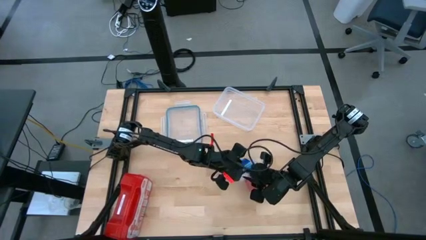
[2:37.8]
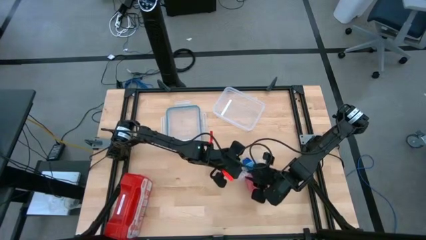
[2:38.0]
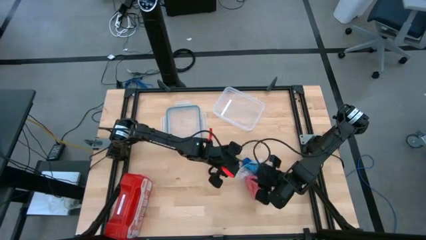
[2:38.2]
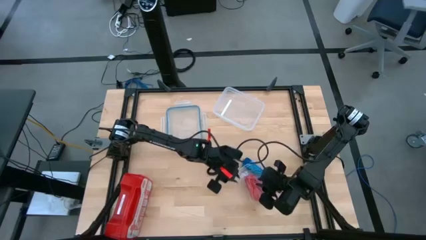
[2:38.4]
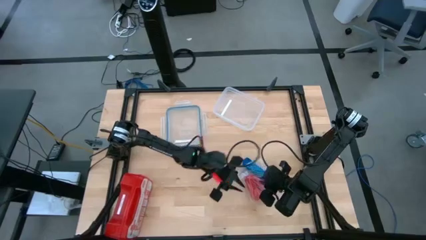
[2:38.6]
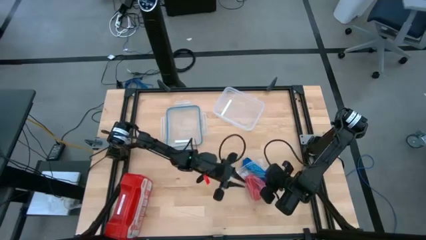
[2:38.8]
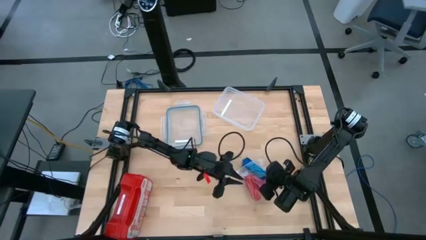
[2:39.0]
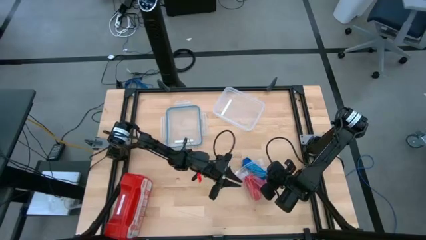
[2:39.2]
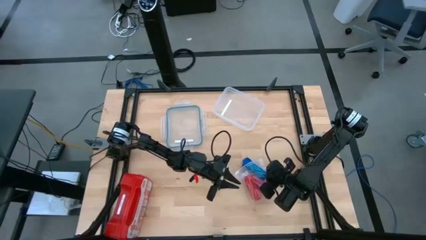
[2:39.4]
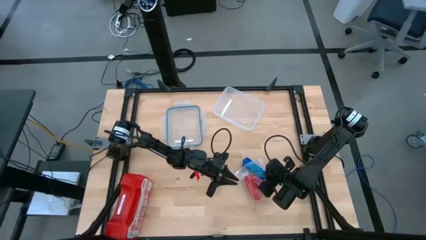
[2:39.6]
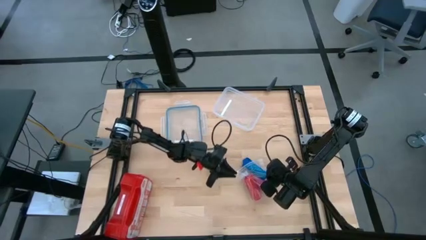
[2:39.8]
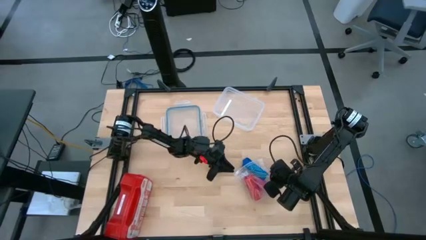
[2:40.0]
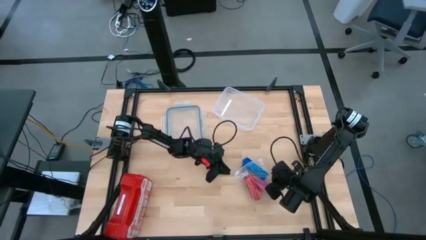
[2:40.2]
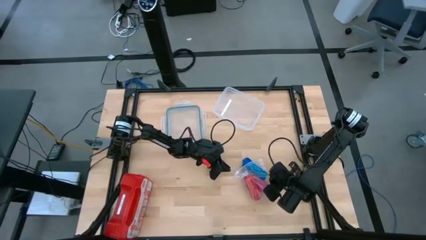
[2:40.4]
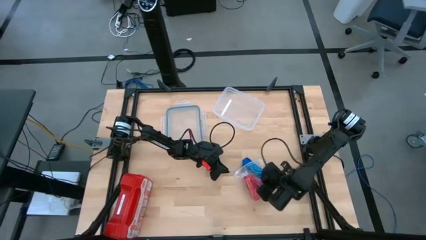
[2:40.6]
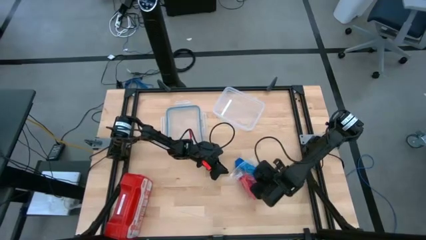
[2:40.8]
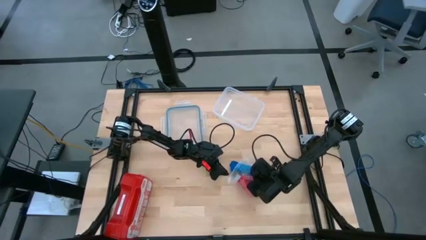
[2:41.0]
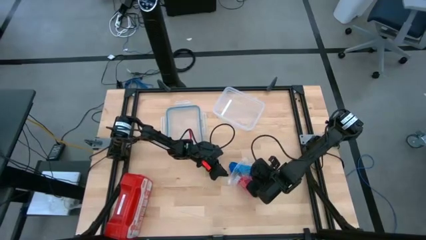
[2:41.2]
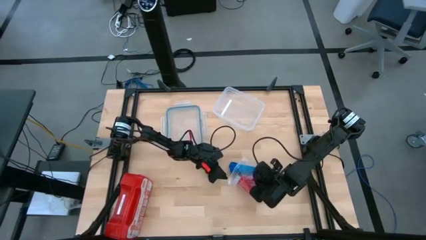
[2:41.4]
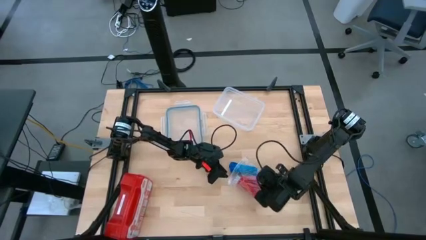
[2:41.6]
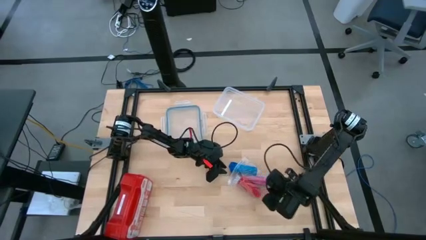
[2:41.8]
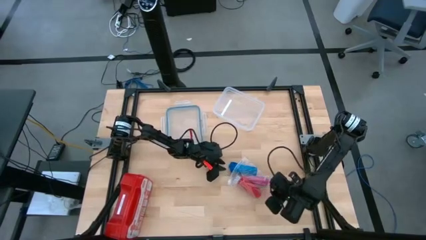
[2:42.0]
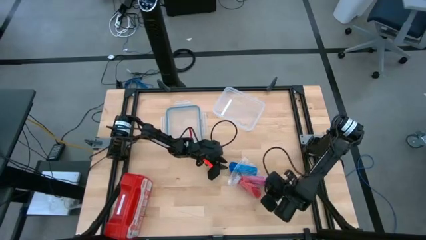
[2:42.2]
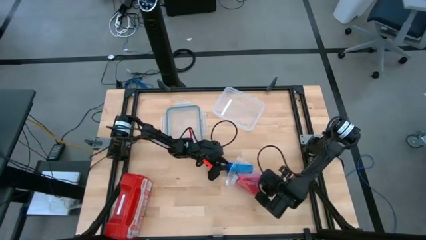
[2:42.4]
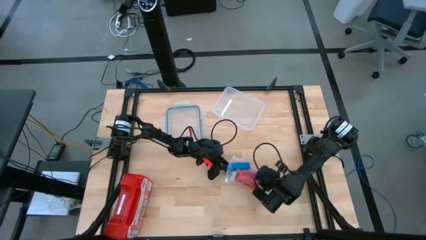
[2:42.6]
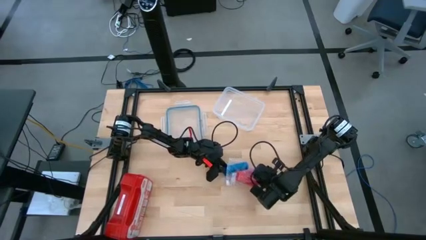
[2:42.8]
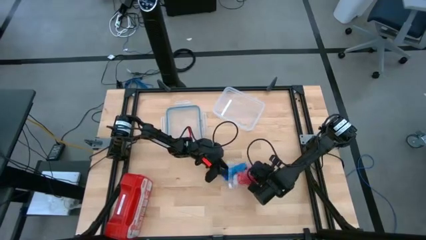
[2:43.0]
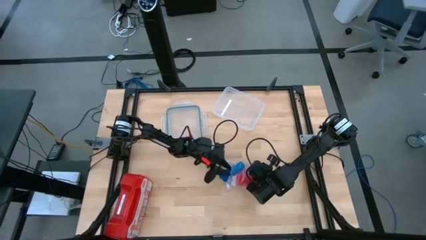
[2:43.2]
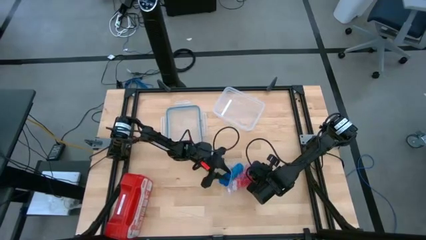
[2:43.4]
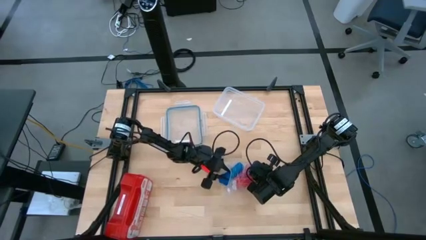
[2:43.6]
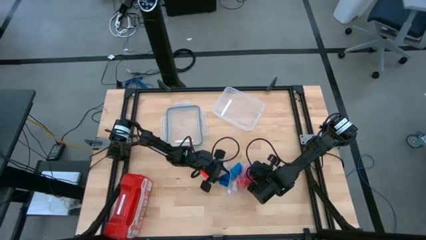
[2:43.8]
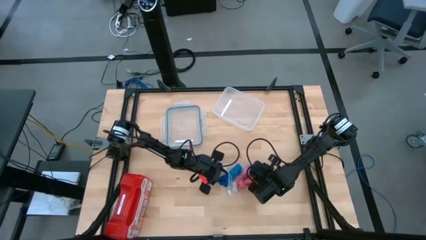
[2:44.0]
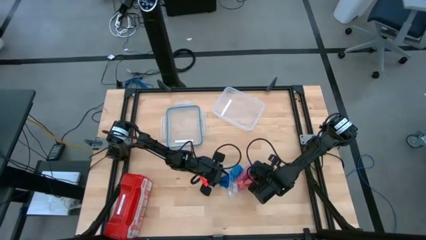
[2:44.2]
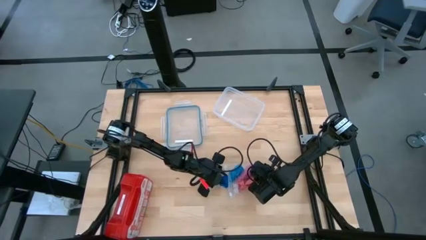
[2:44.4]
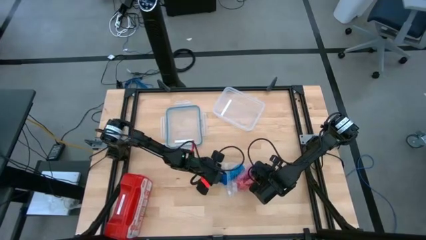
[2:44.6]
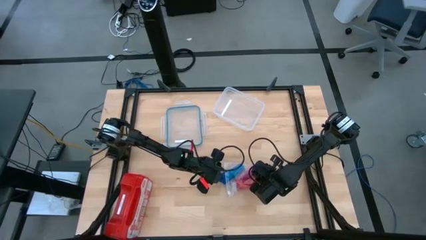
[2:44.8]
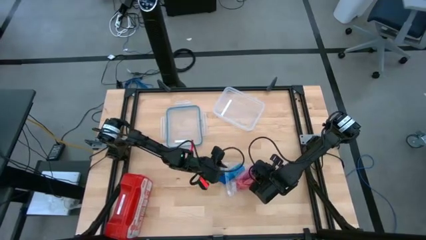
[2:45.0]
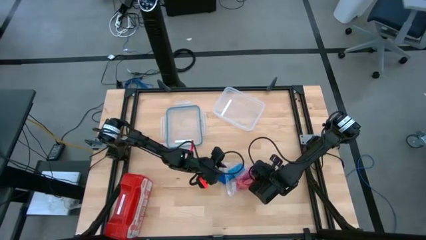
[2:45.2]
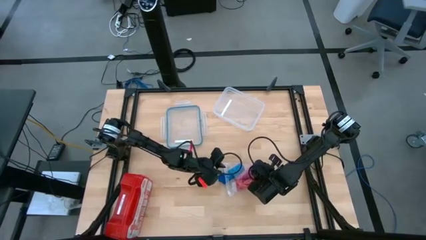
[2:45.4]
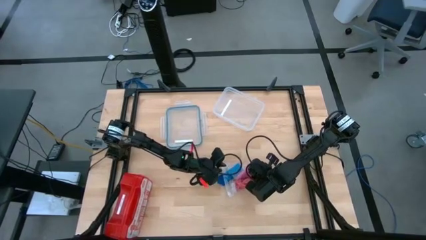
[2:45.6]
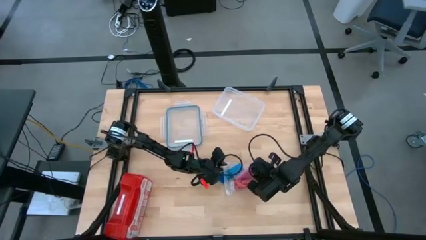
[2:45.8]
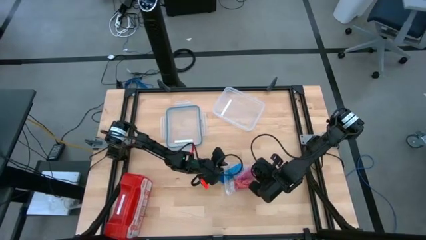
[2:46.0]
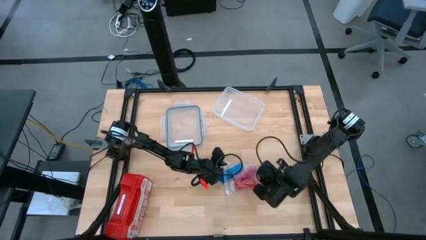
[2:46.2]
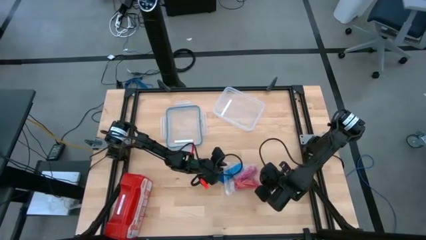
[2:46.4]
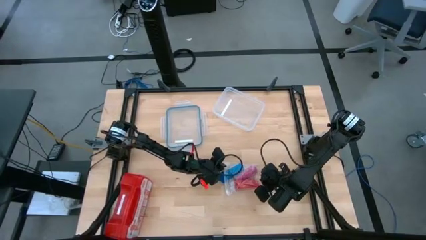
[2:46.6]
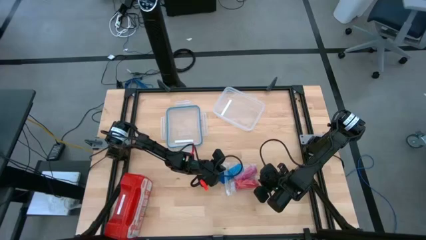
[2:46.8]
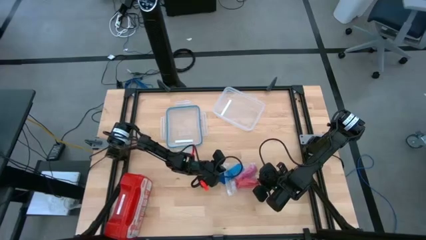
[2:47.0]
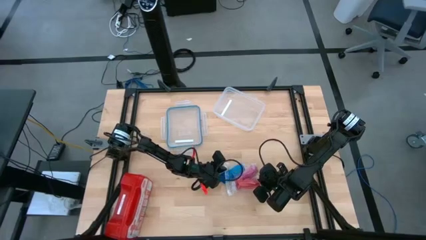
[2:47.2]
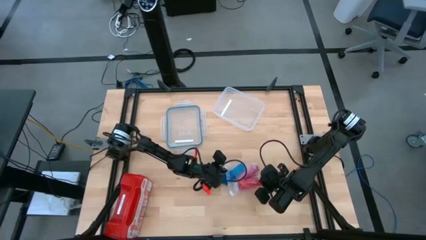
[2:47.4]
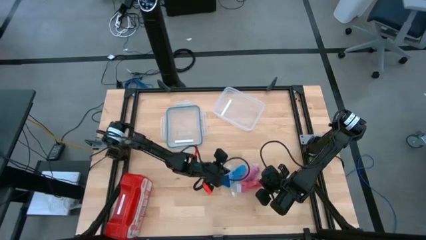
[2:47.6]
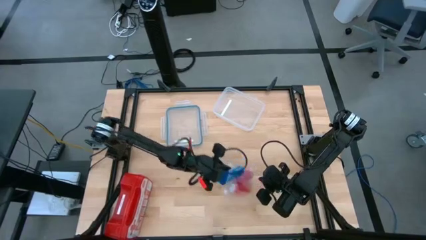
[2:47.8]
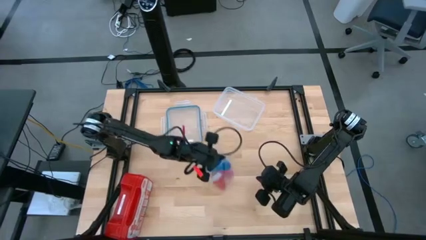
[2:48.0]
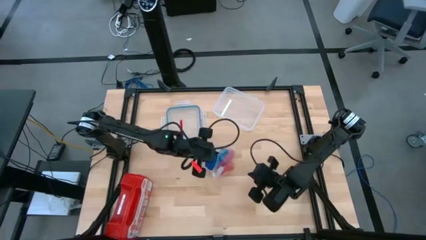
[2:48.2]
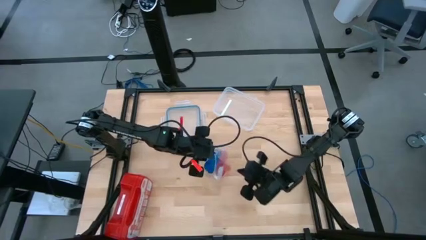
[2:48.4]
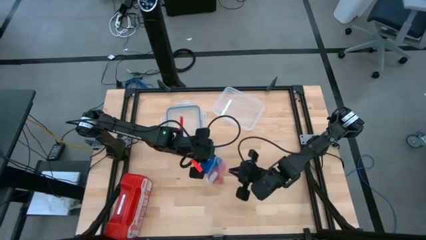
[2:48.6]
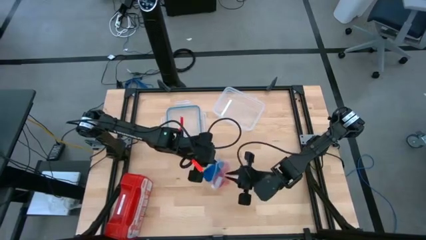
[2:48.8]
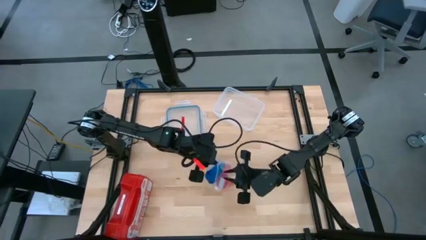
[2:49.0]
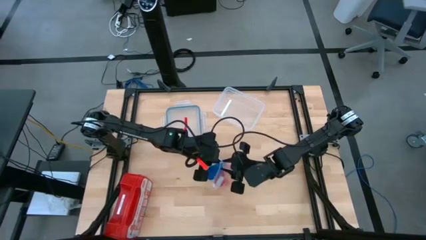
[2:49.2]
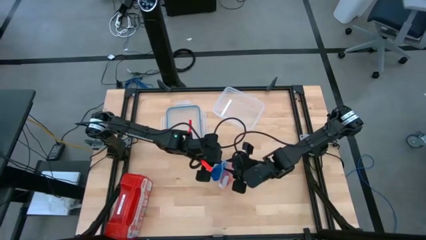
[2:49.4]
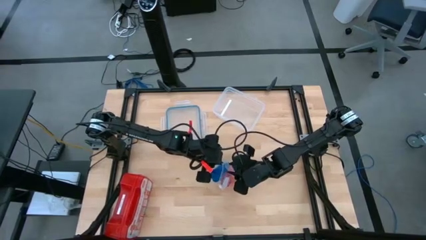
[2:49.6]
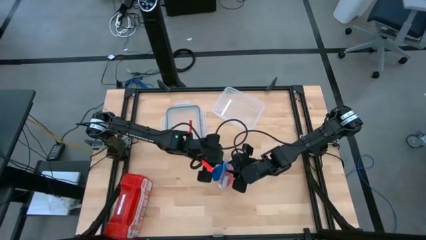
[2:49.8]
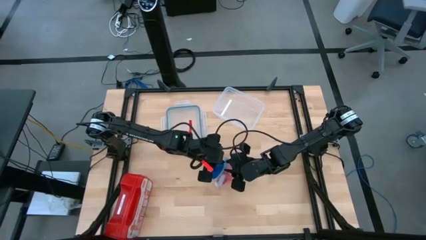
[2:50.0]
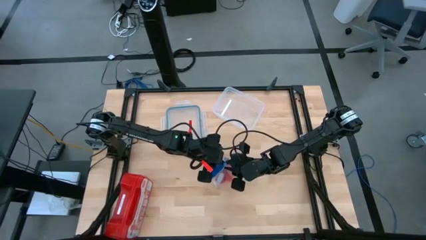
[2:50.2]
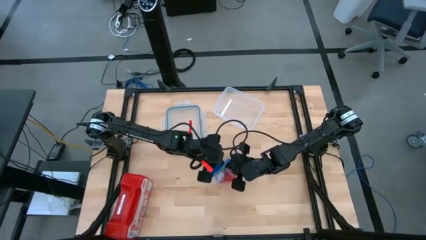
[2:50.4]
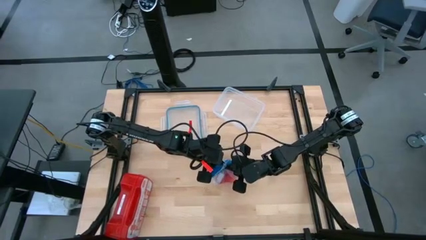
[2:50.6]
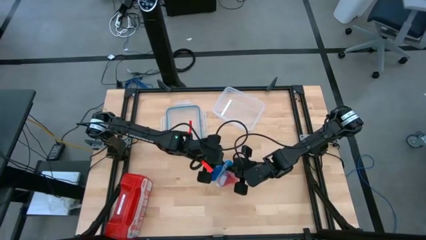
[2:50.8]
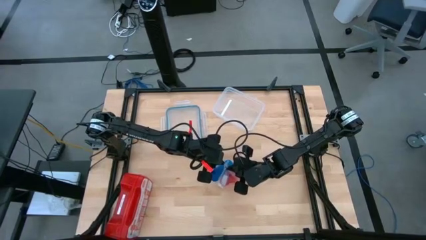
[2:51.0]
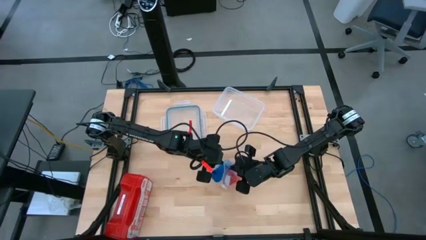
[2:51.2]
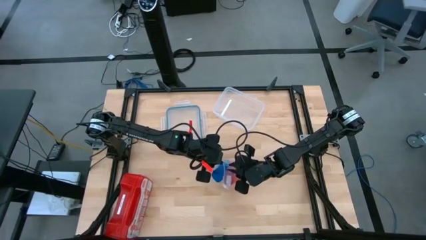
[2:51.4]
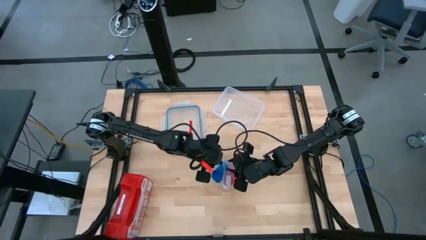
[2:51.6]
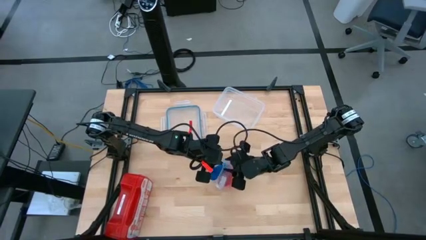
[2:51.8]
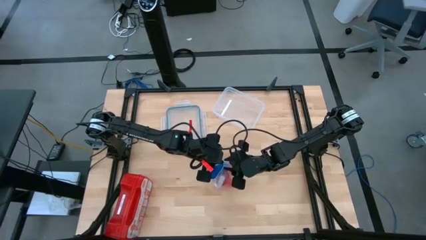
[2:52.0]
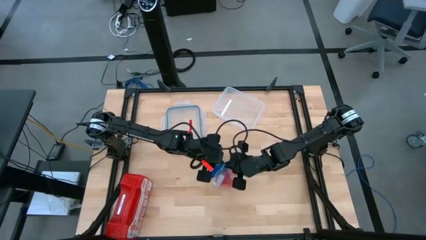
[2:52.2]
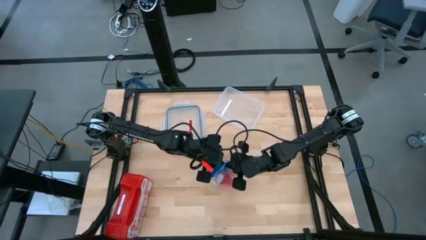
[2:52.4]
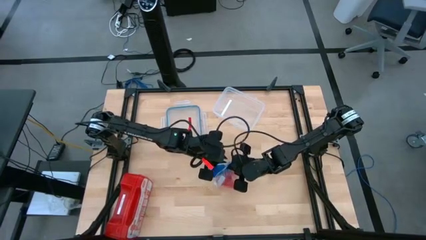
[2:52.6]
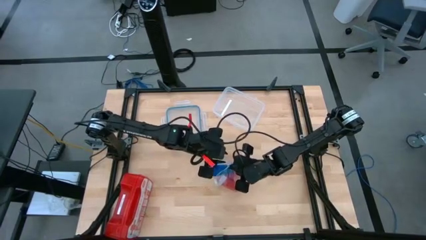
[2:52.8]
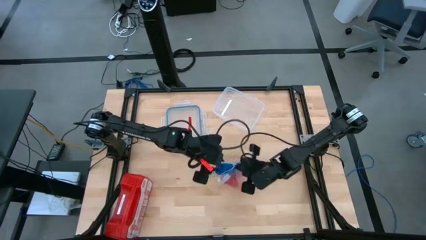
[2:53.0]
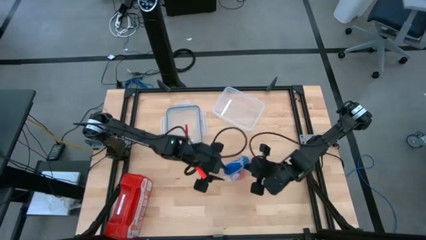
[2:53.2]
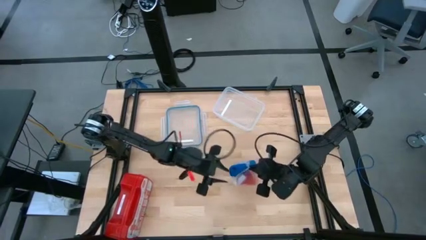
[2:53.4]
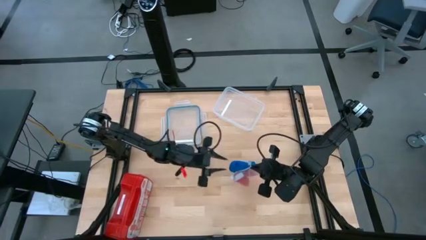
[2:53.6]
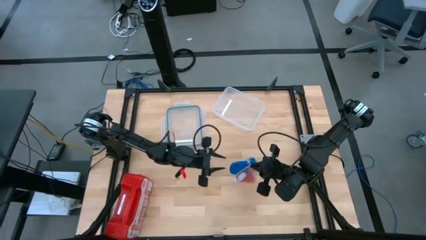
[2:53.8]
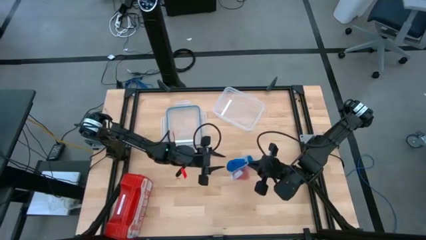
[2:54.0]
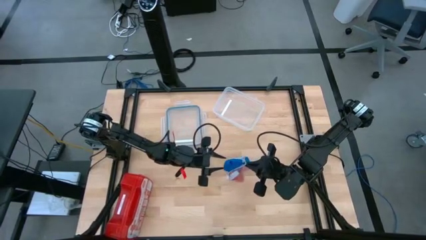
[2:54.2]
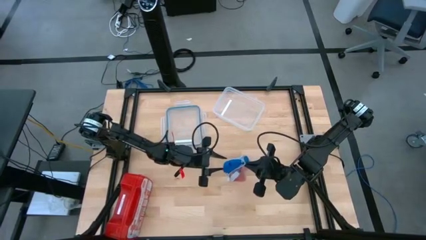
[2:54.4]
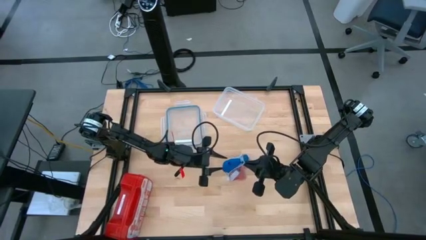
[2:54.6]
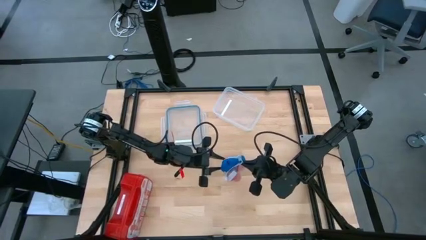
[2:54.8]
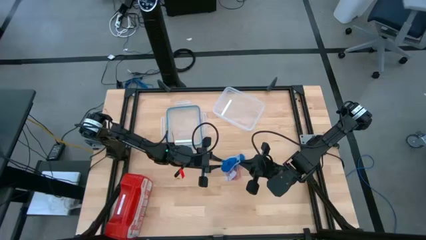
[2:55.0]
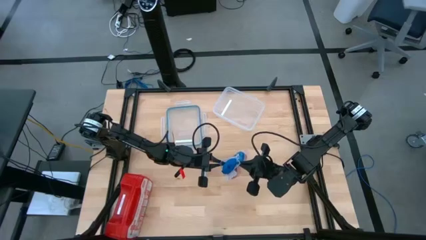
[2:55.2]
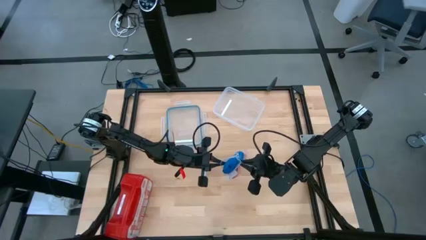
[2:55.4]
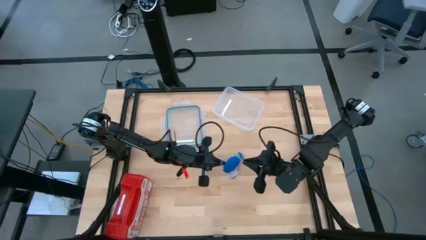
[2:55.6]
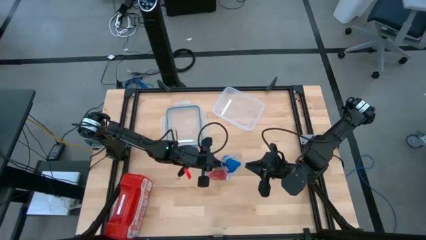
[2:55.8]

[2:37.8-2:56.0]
Task: Roll bandage
Put the blue bandage into the transparent zip bag
